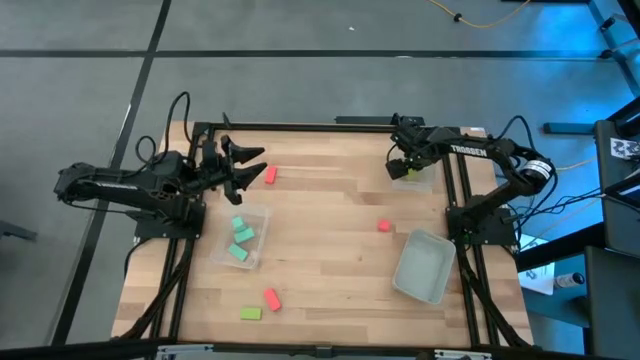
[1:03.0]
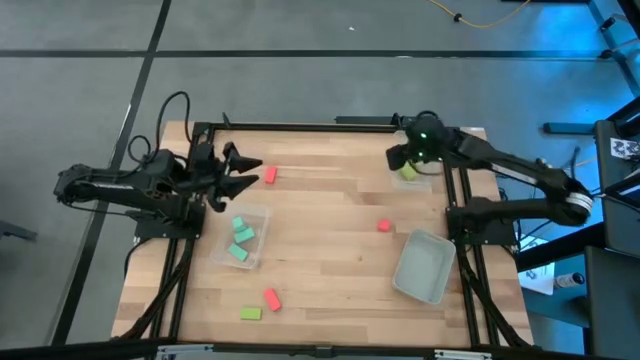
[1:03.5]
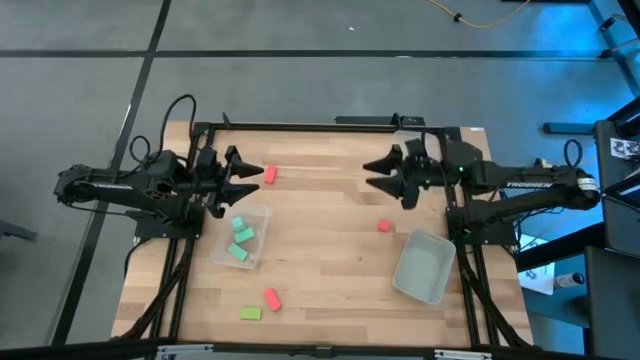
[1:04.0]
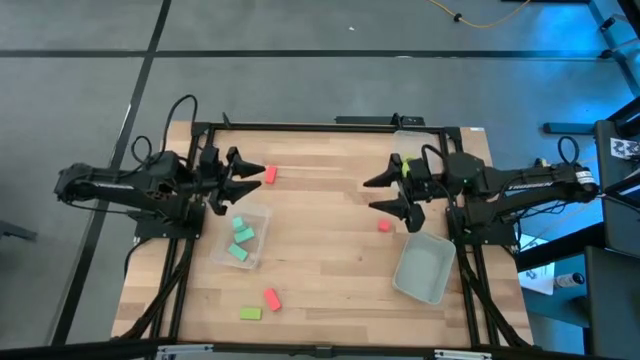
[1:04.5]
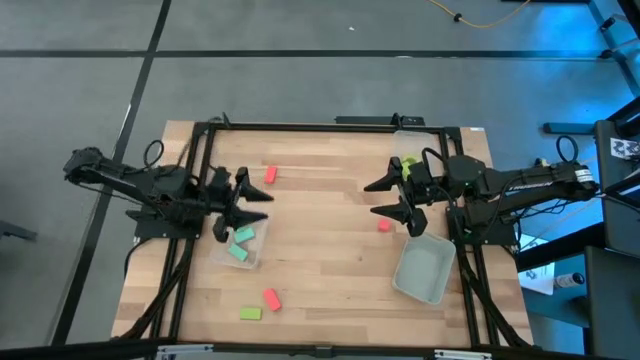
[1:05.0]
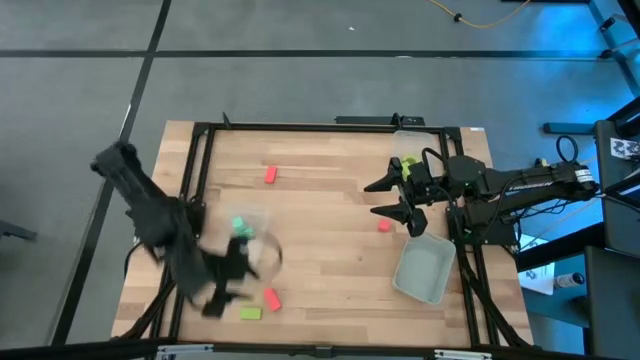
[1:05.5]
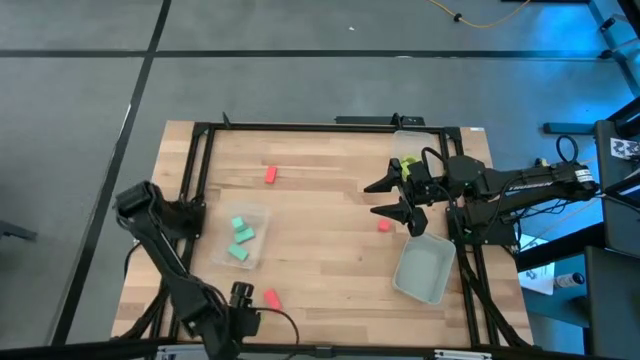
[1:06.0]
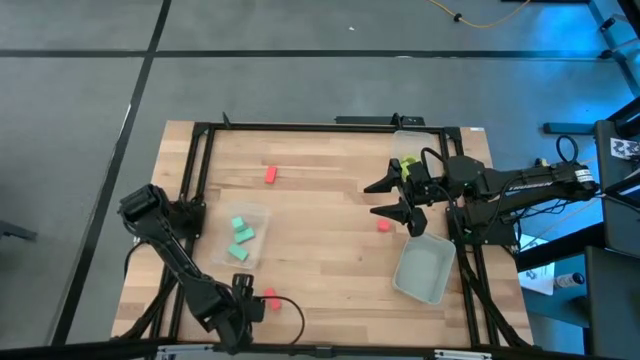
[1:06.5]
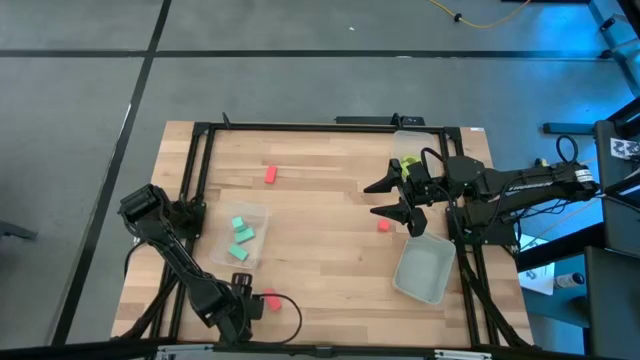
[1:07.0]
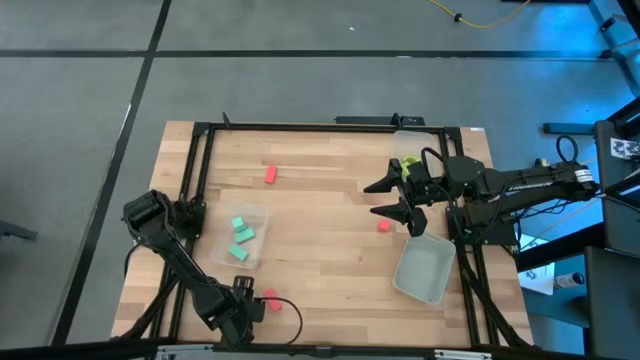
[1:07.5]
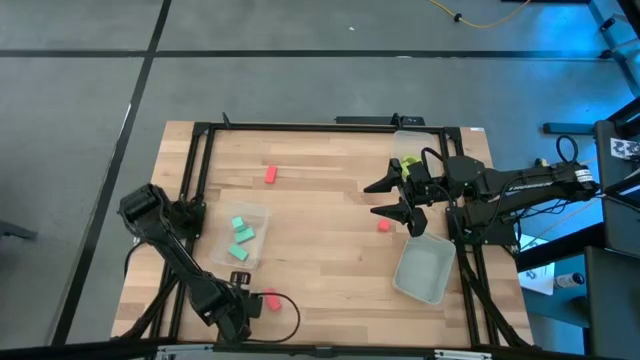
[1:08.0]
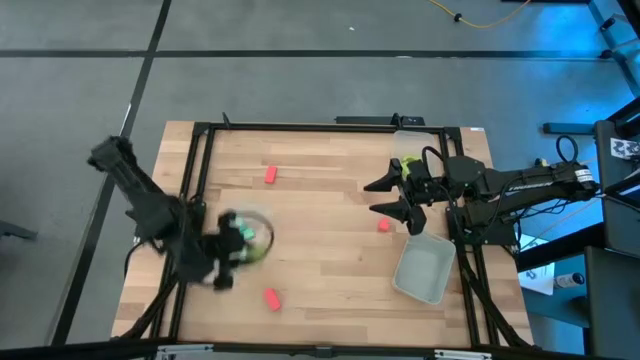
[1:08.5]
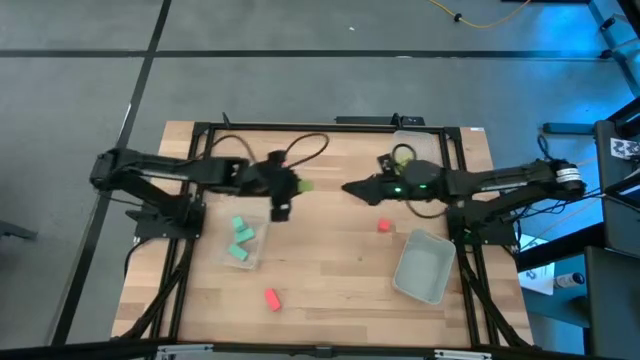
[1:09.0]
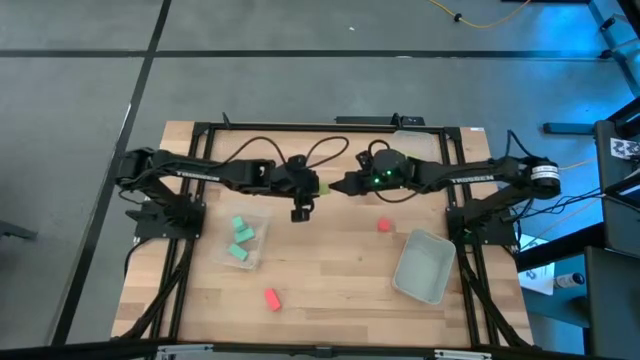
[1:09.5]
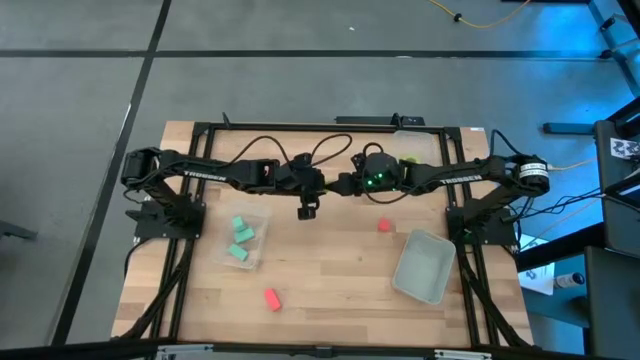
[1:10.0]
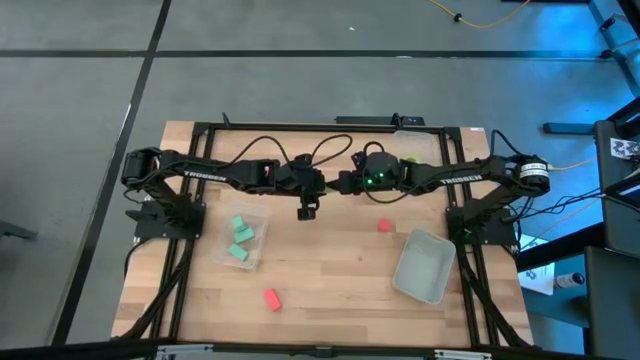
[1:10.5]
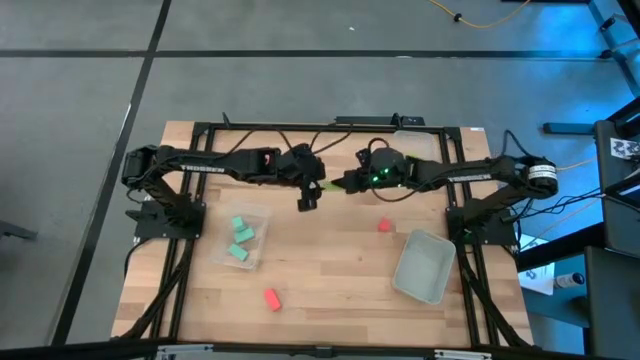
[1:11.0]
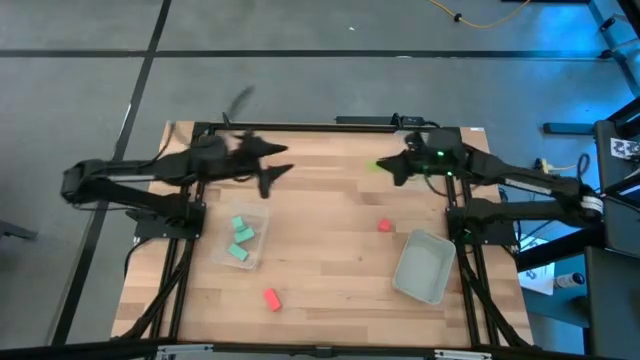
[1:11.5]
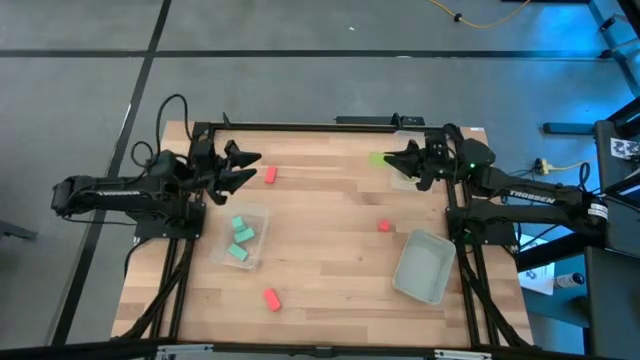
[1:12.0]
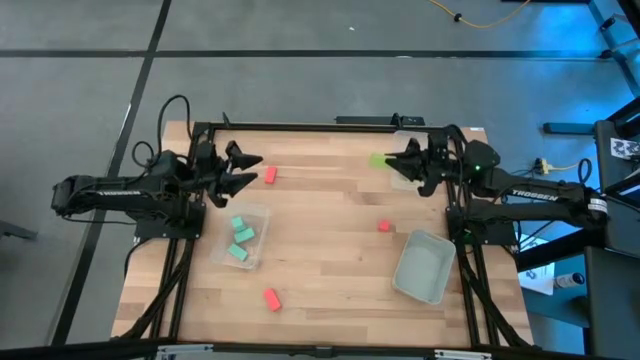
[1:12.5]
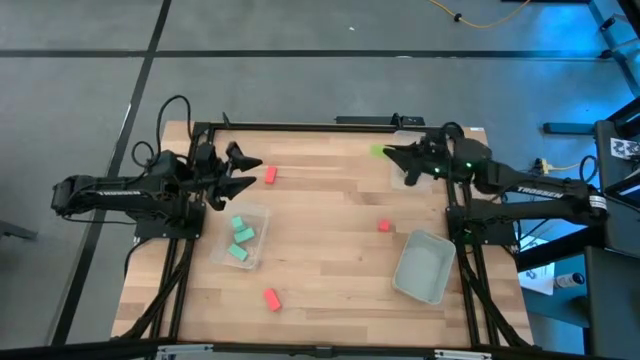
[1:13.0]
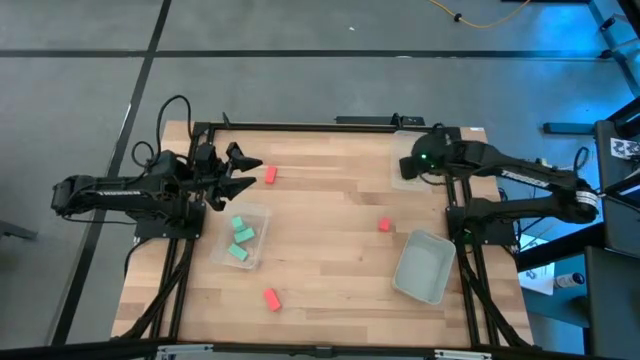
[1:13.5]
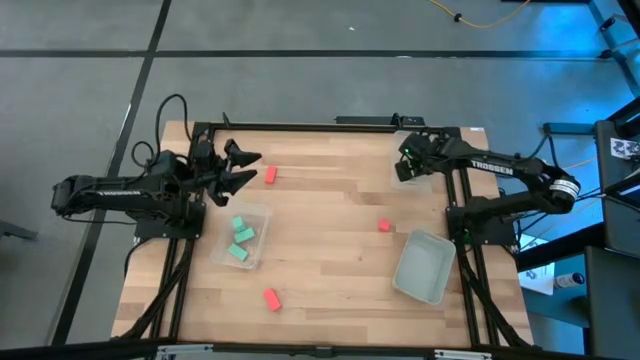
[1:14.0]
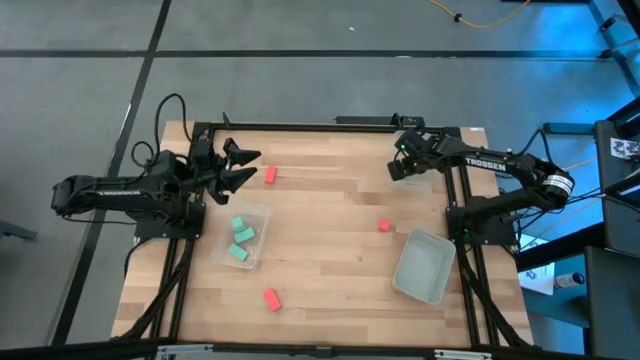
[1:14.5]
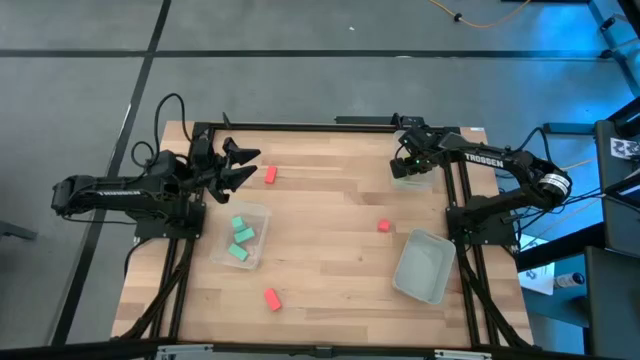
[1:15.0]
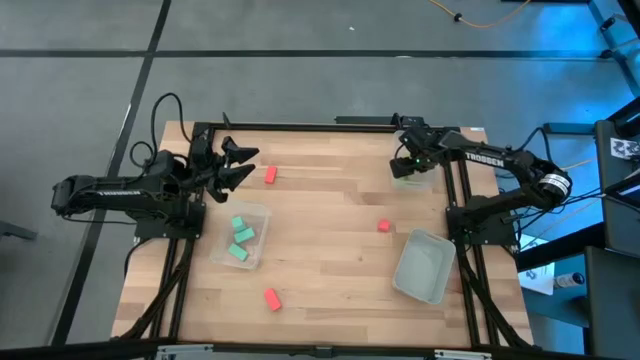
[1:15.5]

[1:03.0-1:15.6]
Task: Sort & place blocks by color
Put the green block into the right transparent bin

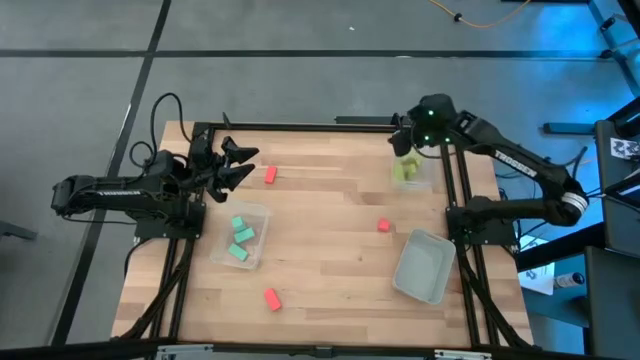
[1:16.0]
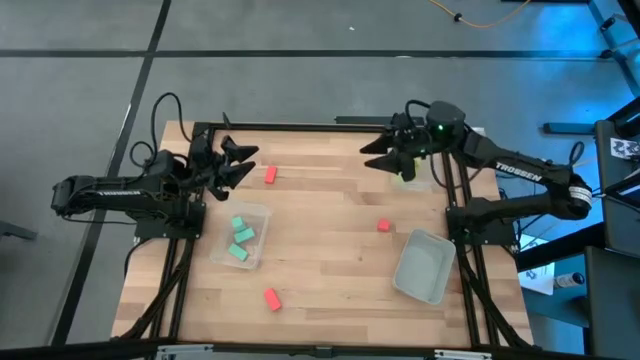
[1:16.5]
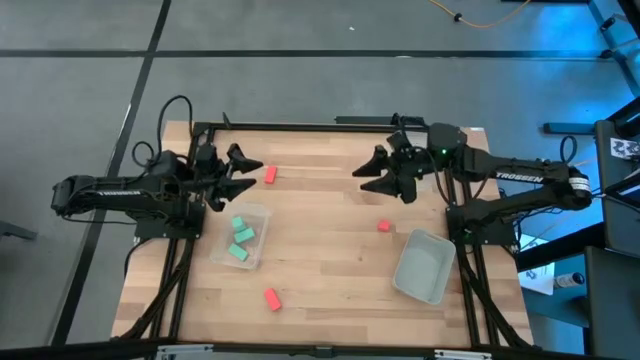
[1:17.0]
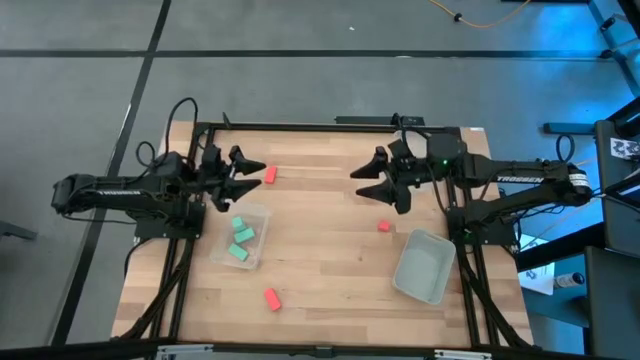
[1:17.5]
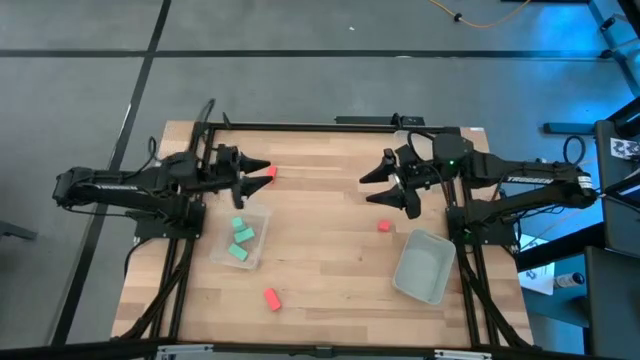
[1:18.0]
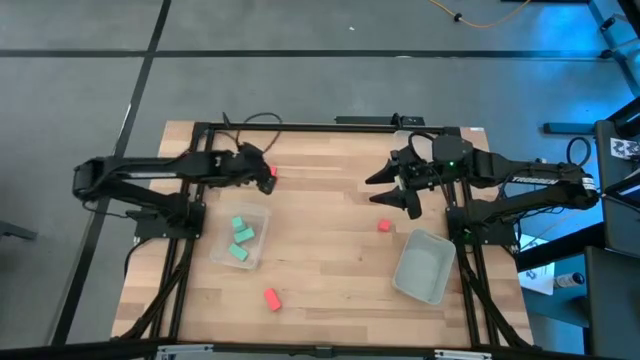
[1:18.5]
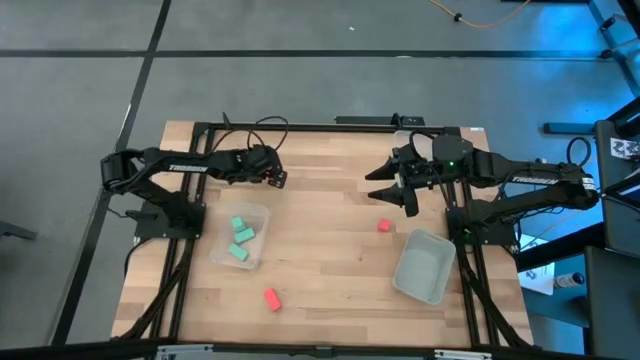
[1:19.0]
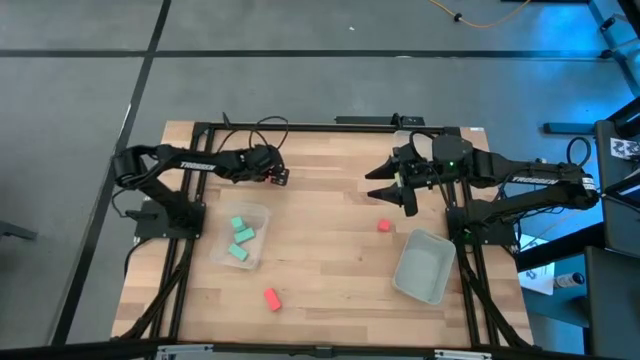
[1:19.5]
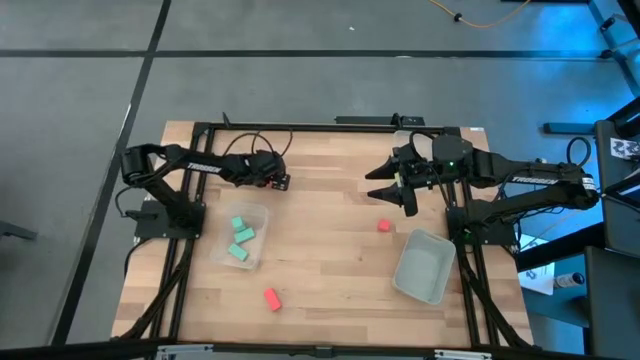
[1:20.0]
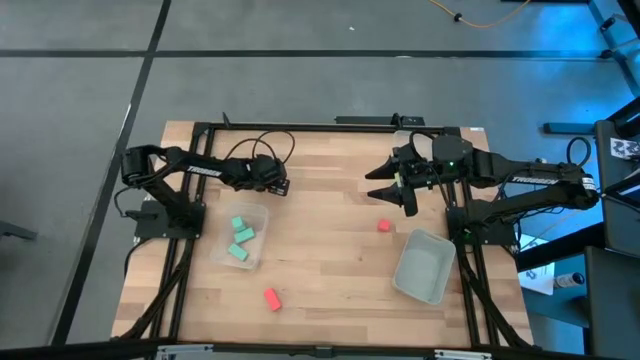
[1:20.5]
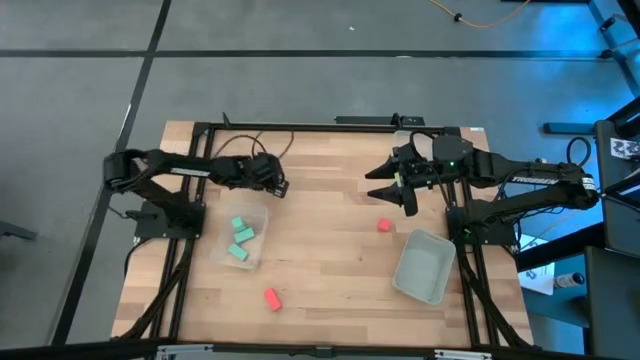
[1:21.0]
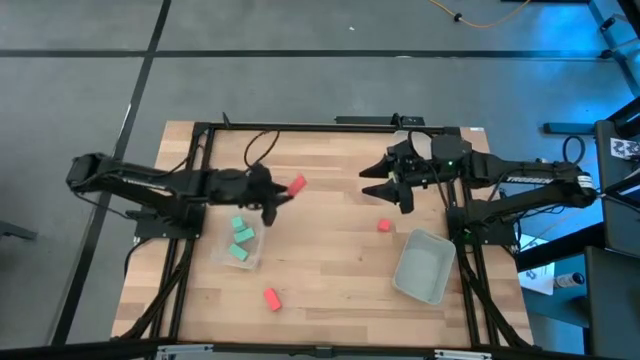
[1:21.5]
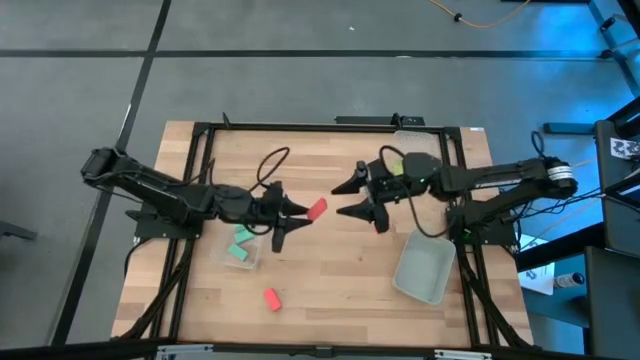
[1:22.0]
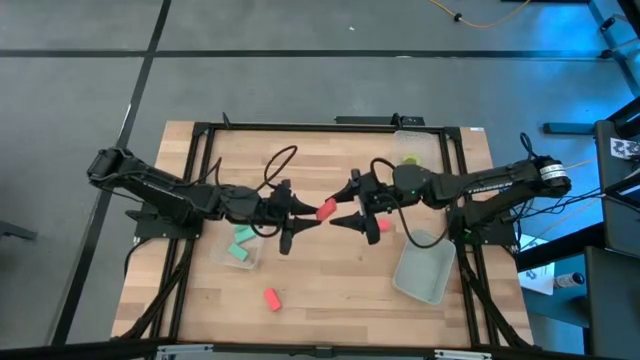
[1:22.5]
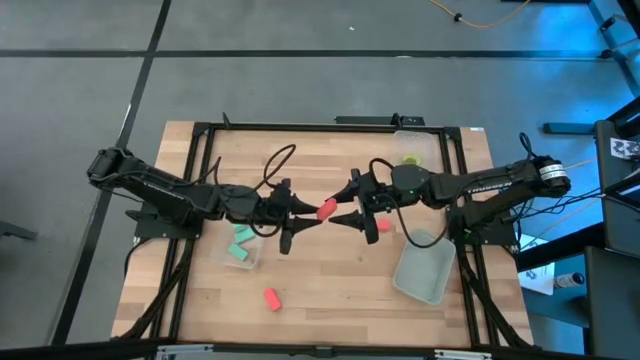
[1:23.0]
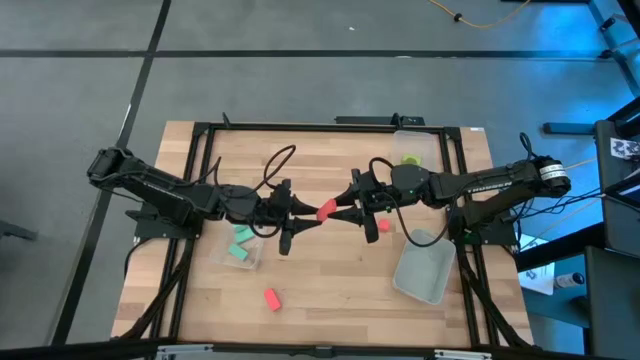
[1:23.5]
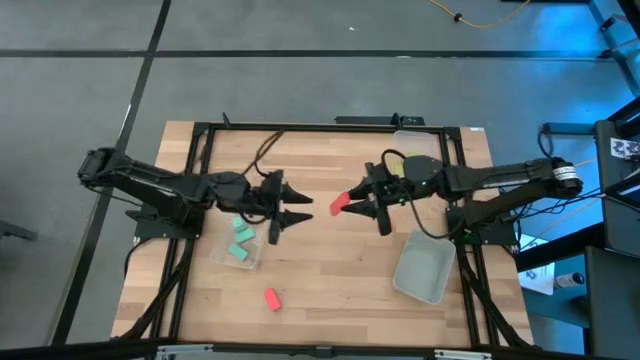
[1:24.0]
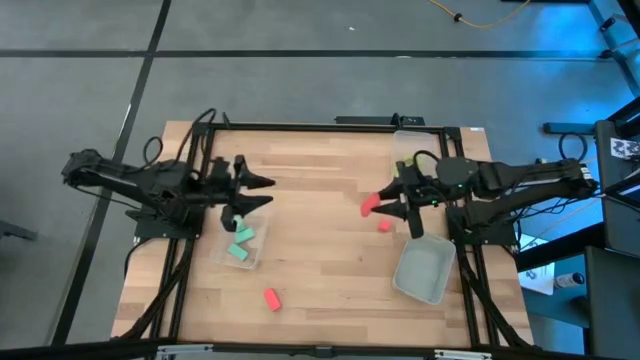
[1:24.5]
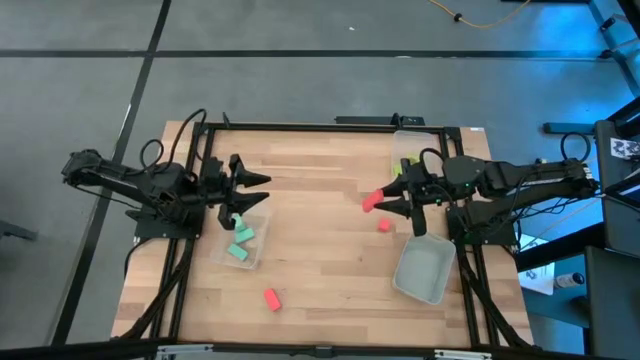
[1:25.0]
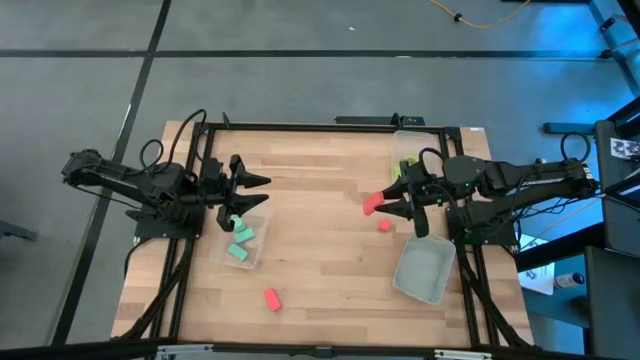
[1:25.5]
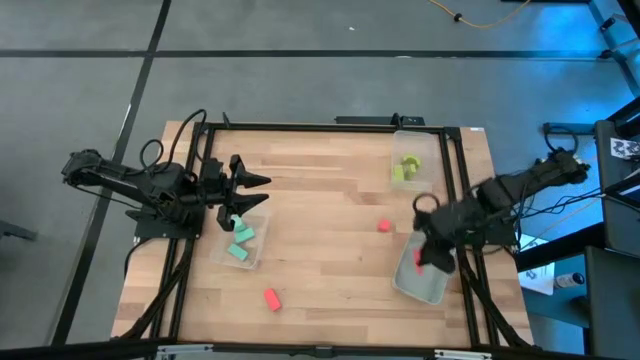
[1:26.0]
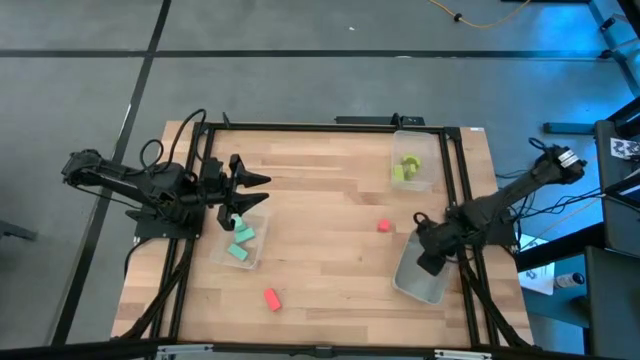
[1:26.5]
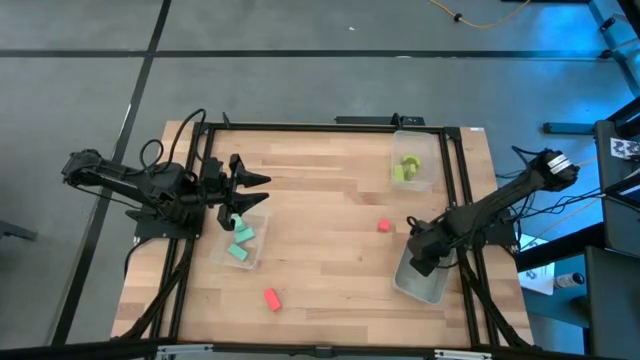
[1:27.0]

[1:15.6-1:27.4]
Put the top left orange block into the gray bin
